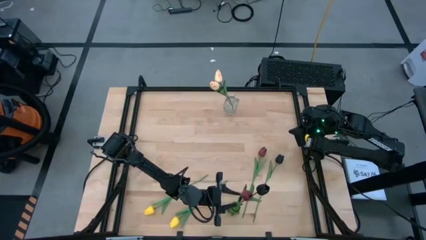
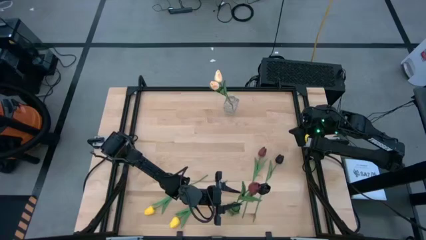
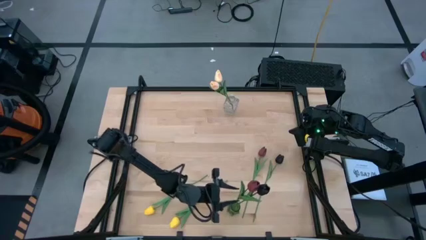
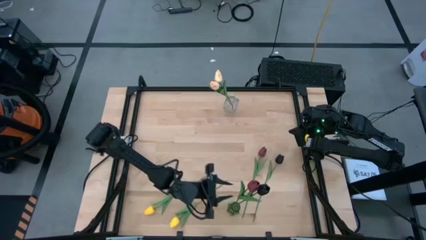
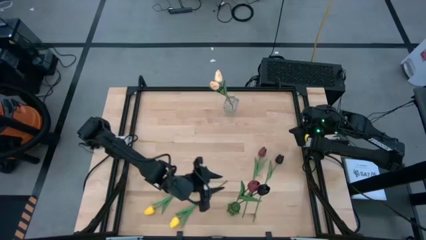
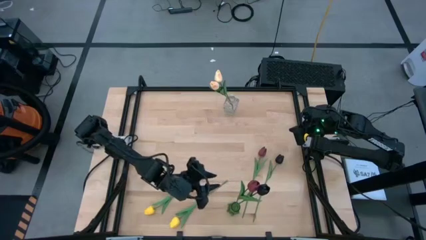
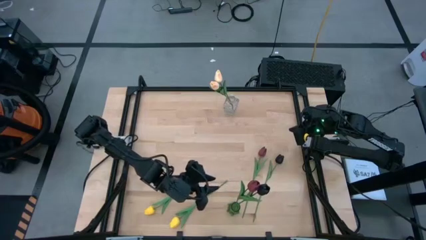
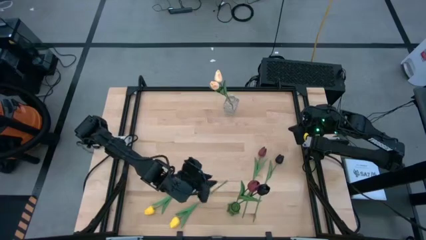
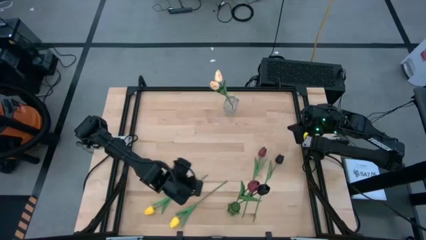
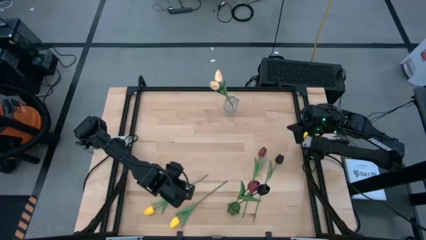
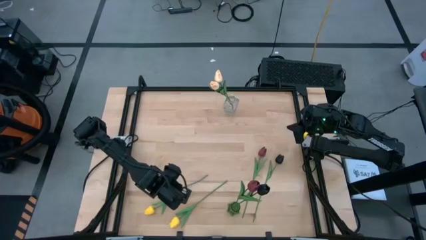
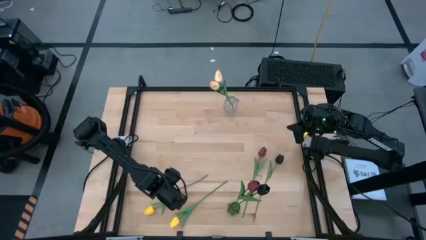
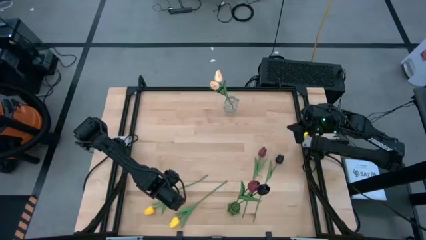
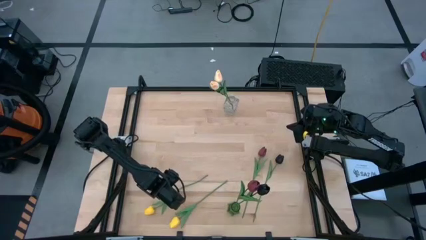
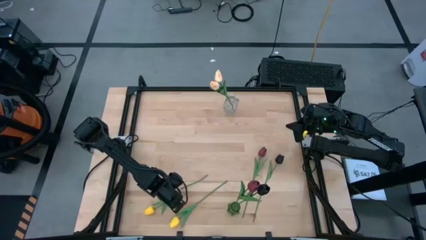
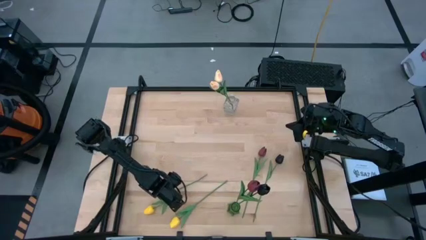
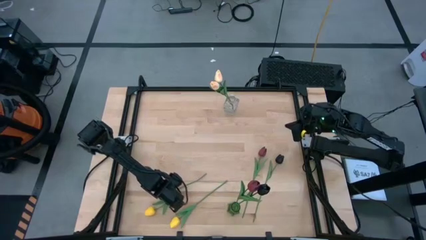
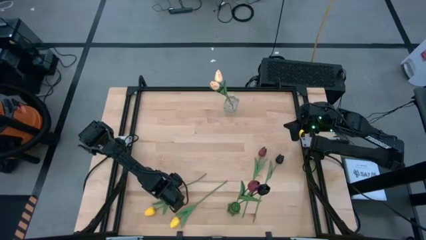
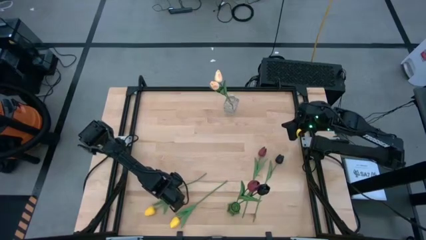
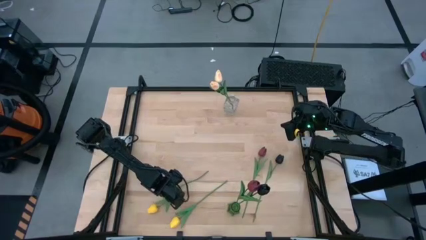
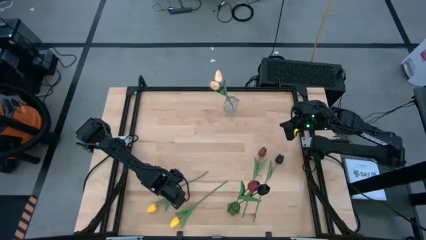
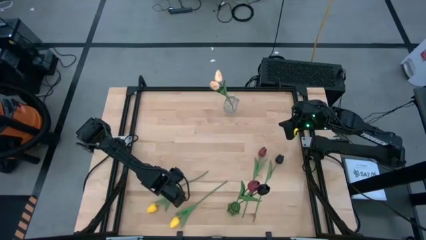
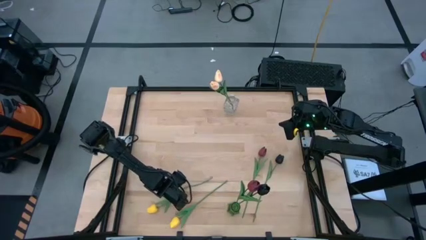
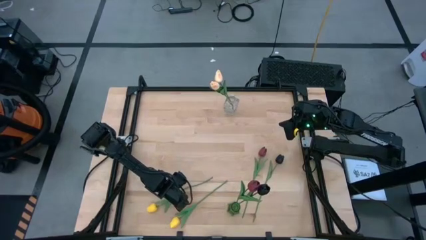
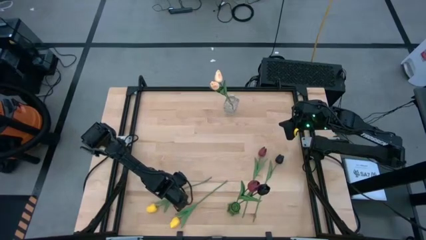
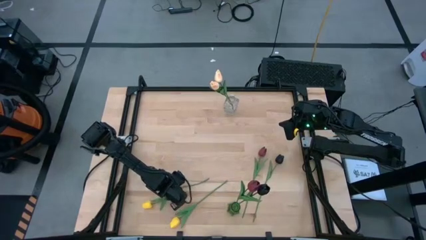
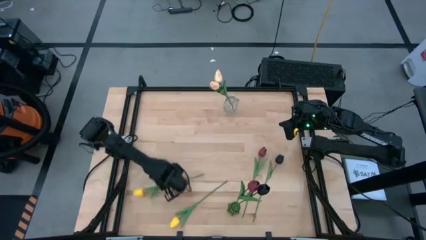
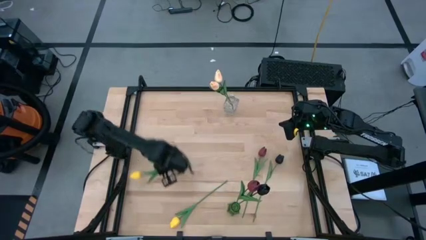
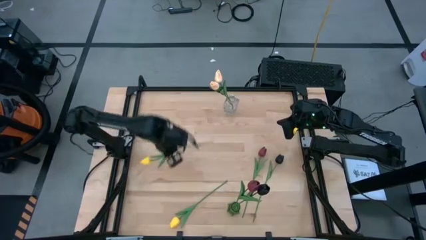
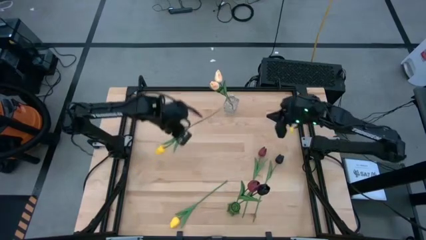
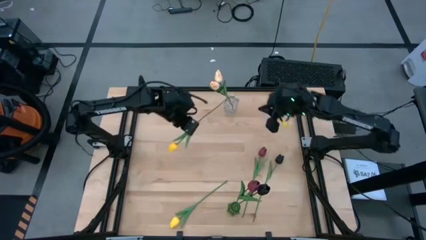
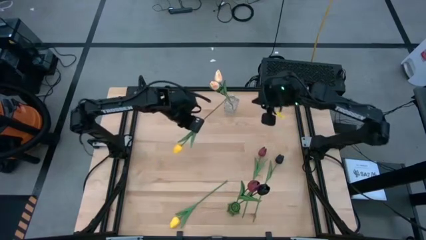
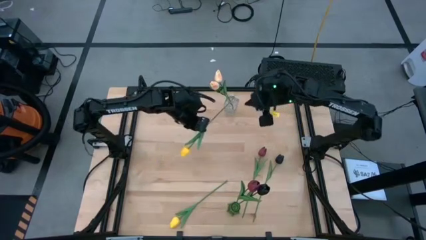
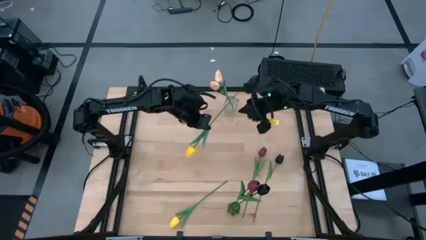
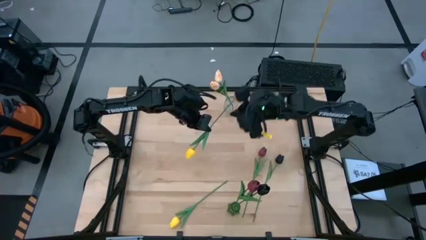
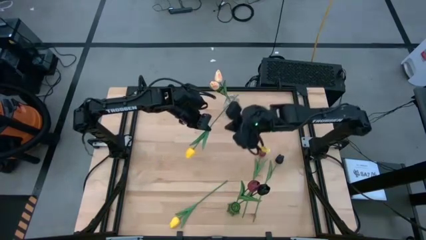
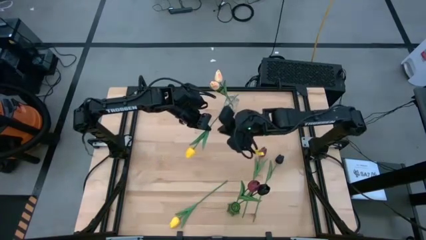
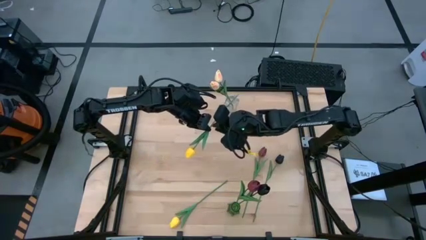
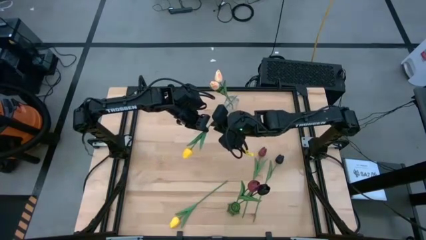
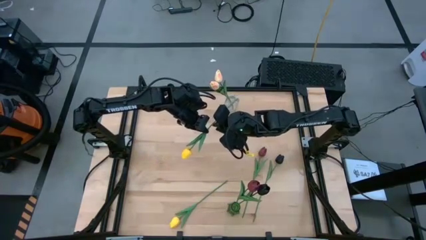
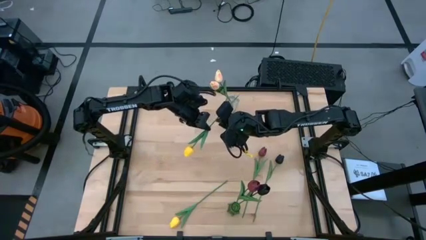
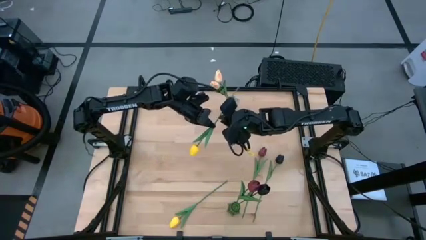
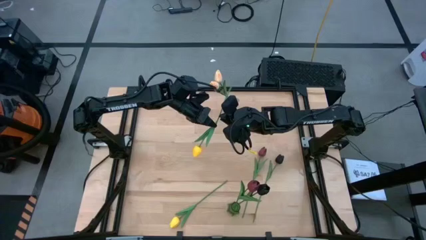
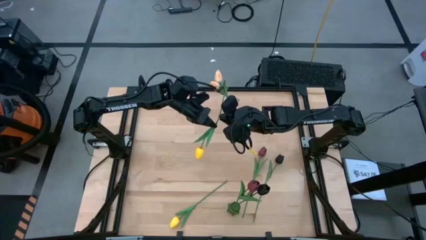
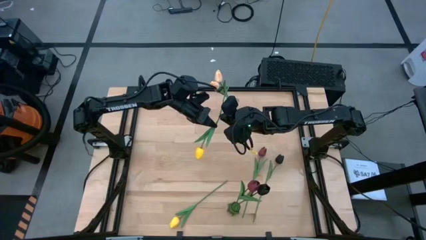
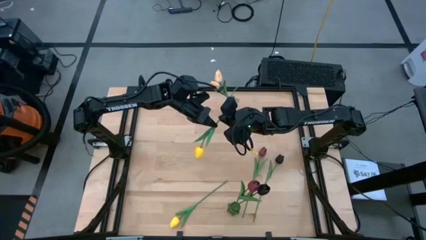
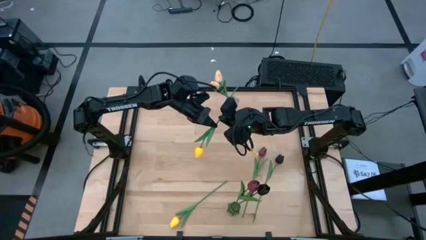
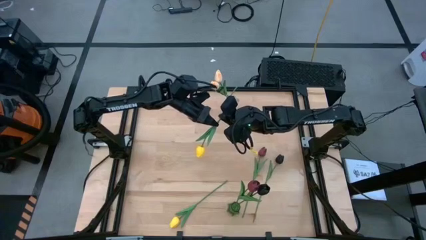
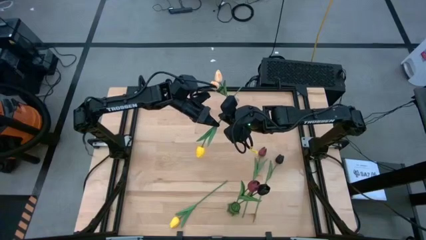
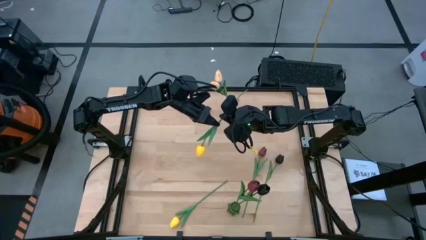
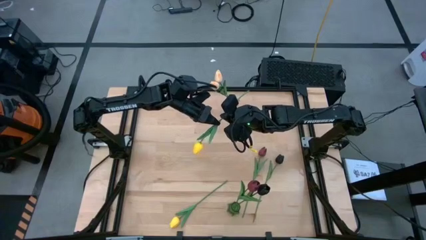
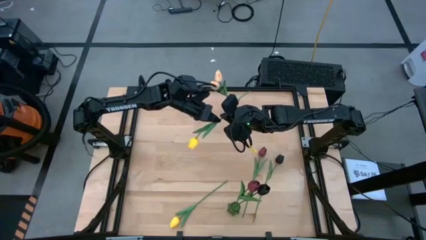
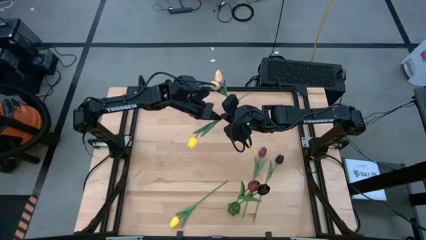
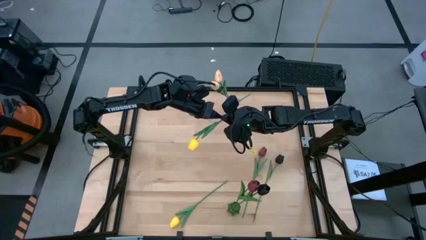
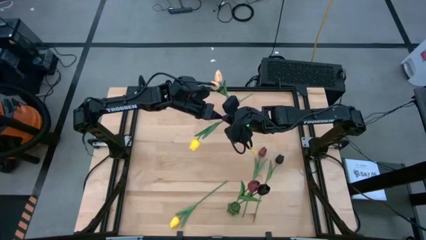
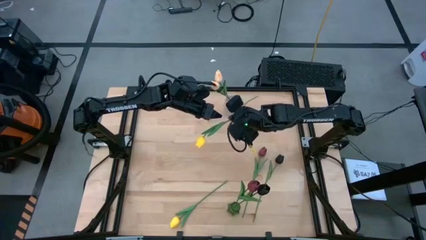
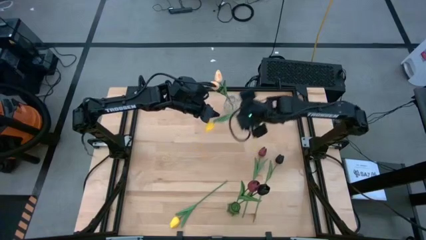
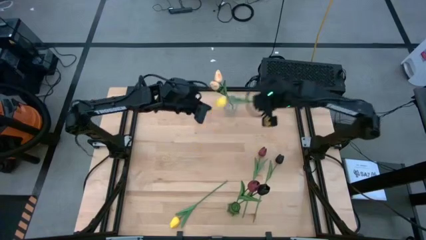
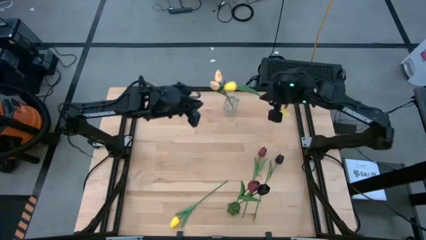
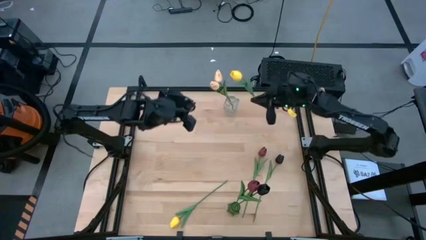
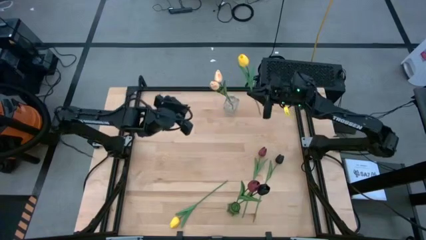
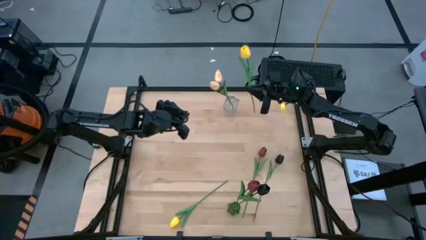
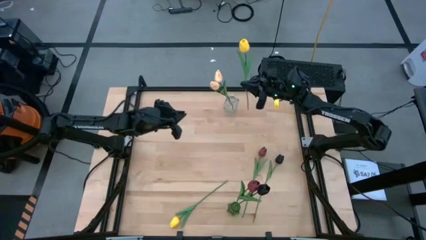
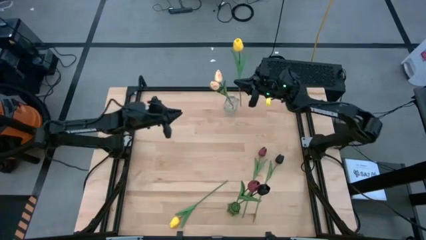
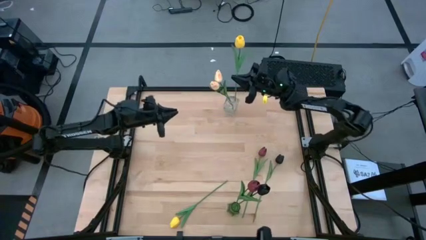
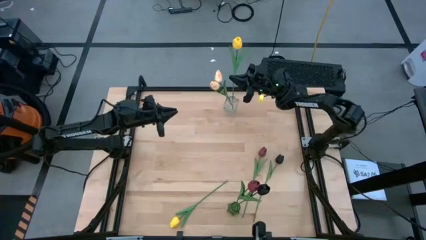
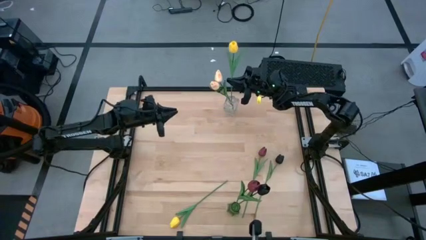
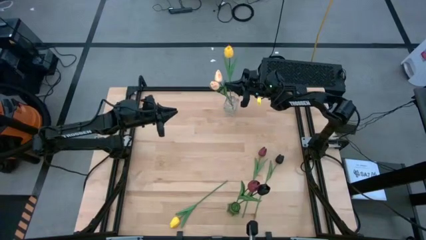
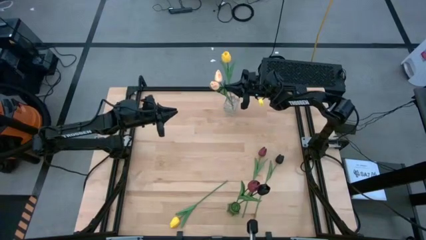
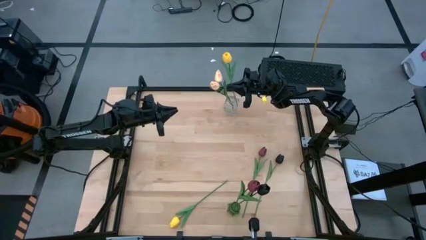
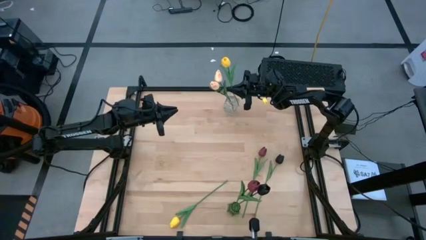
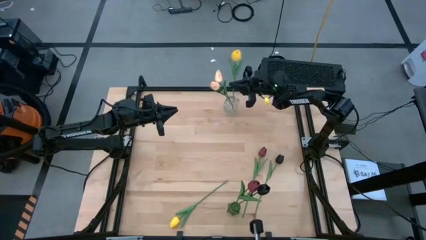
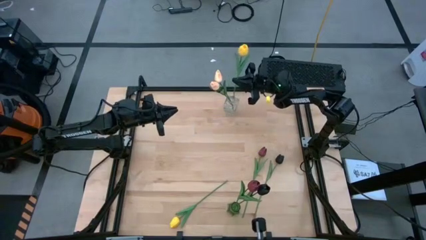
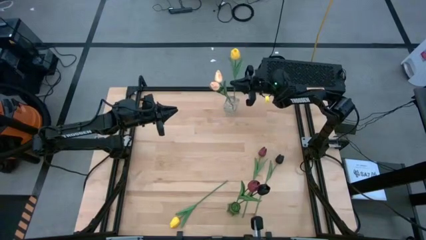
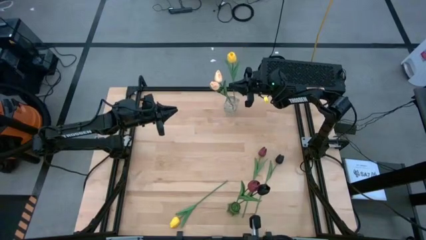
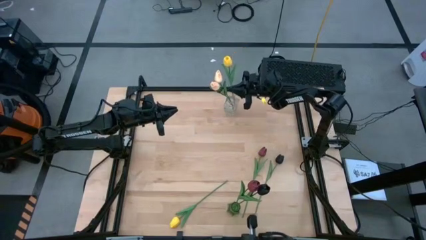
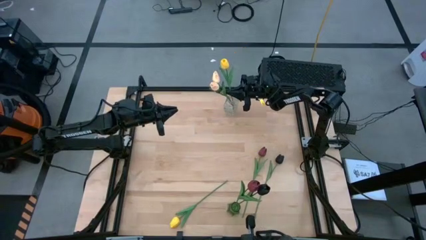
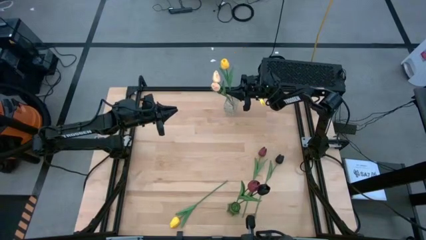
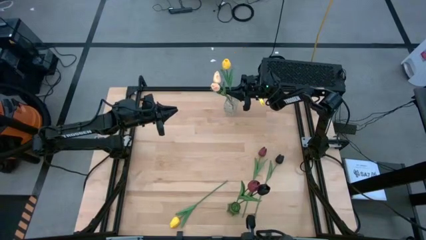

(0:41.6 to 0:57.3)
Task: Sort flowers into vase by color
Put the top yellow tulip into the transparent flower vase

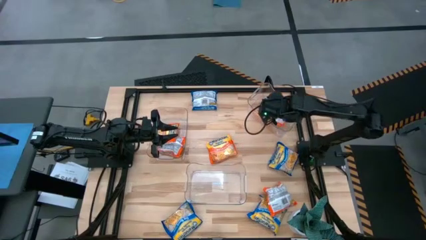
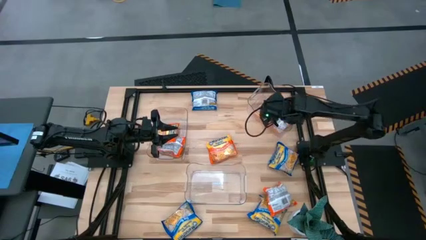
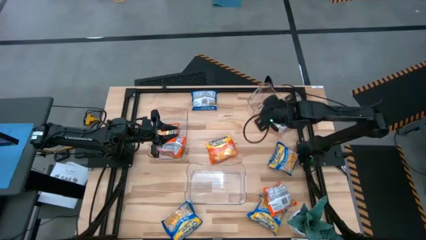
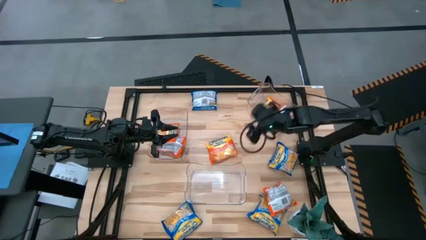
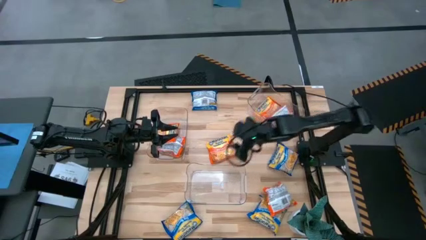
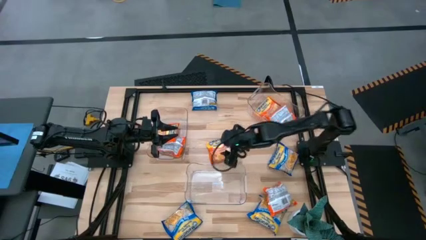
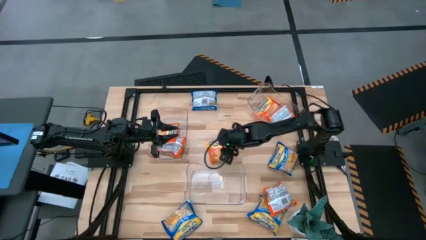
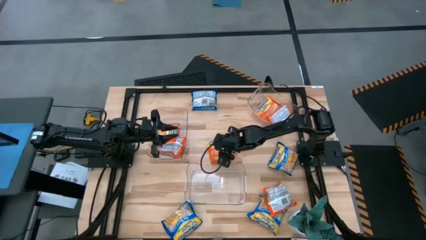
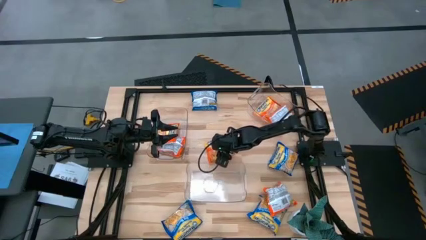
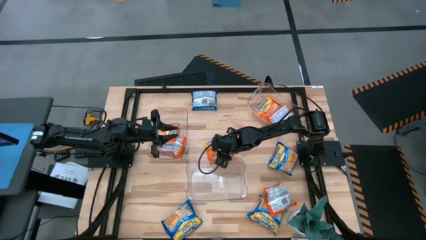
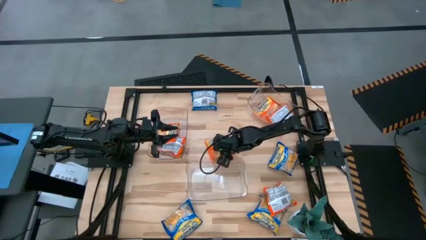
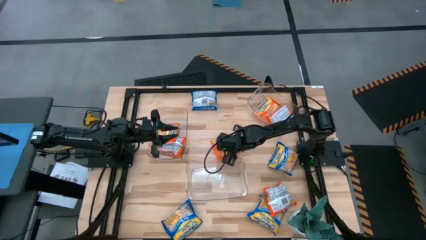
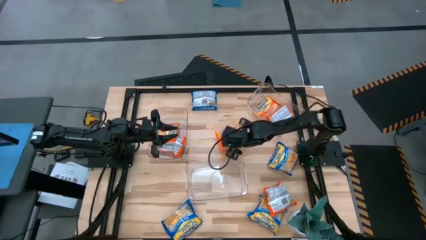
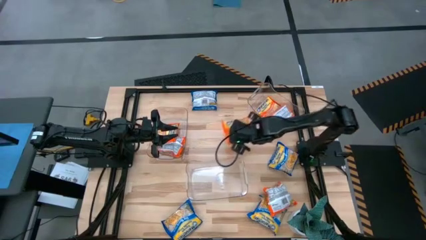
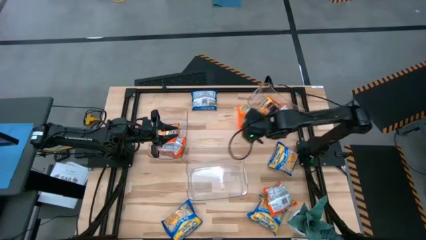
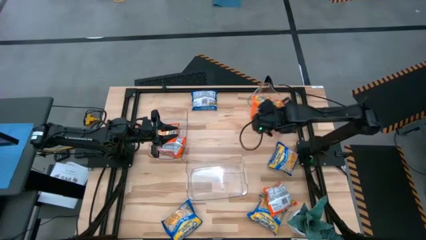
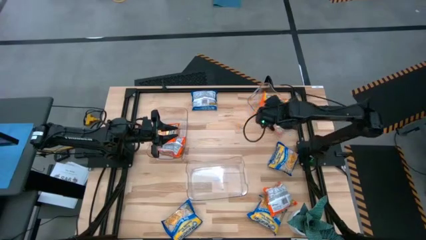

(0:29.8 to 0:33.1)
Task: Sort Maruchan noodles
Put the orange noodle pack into the top transparent bin
